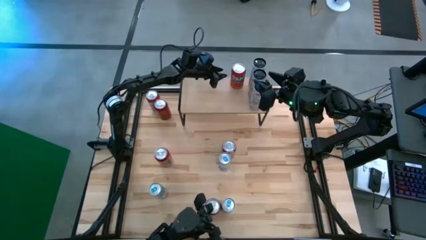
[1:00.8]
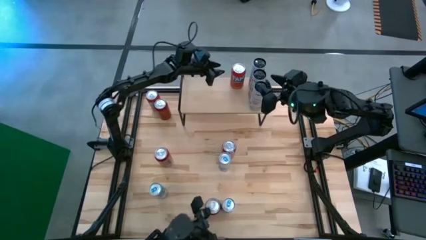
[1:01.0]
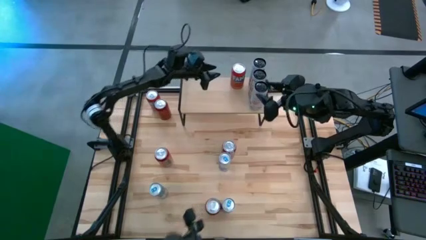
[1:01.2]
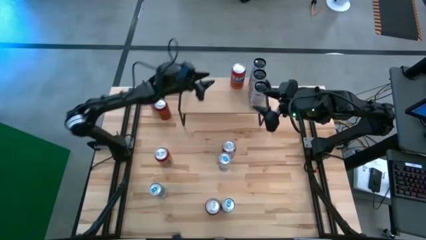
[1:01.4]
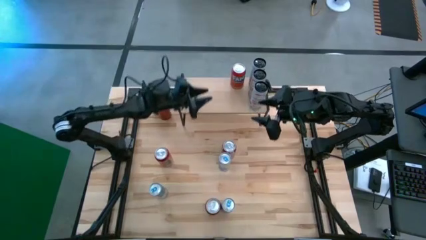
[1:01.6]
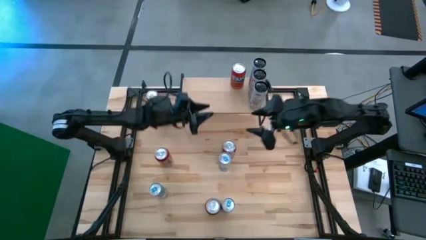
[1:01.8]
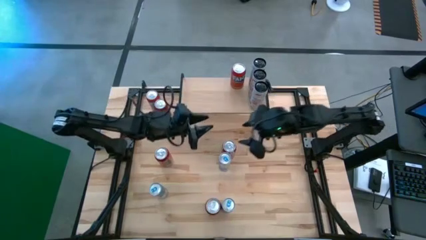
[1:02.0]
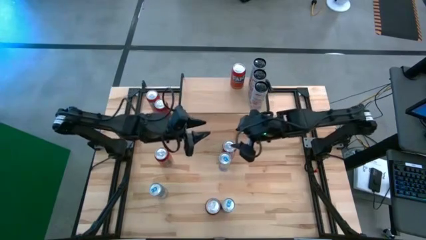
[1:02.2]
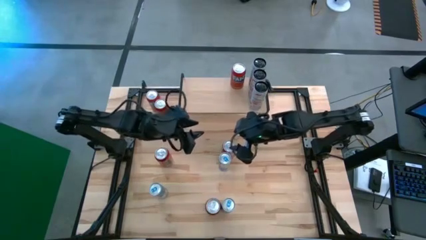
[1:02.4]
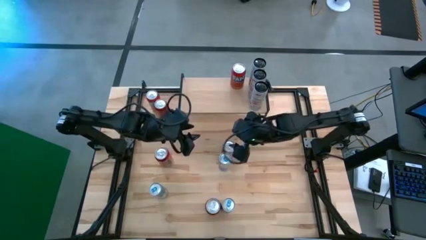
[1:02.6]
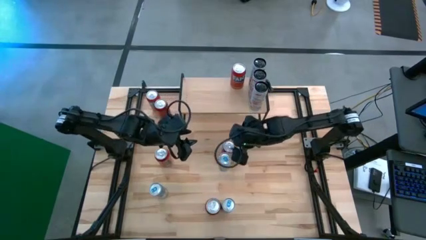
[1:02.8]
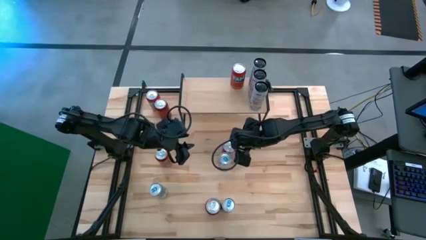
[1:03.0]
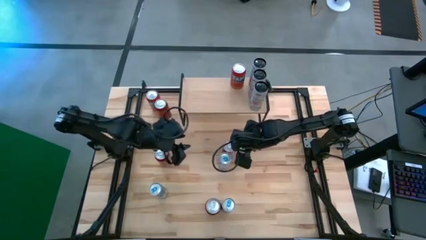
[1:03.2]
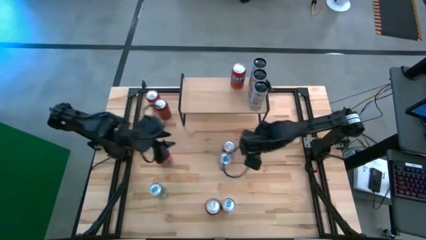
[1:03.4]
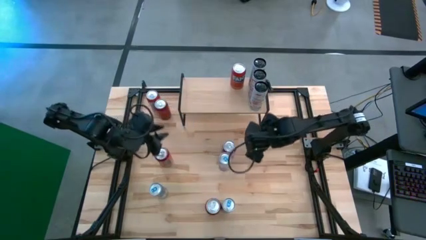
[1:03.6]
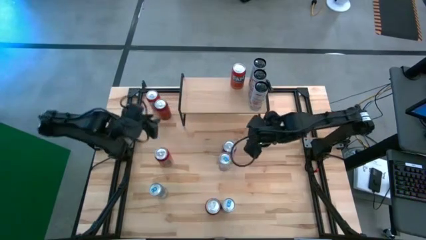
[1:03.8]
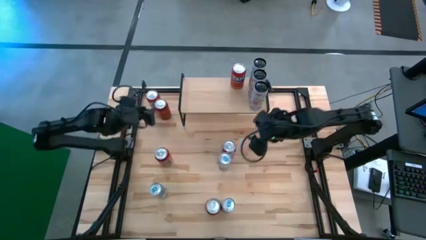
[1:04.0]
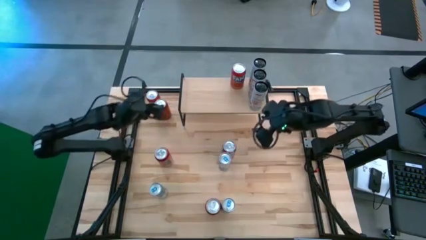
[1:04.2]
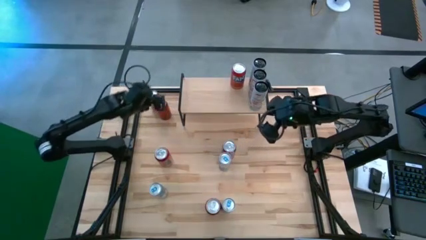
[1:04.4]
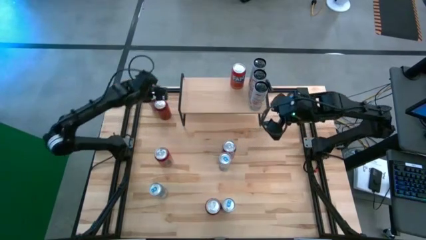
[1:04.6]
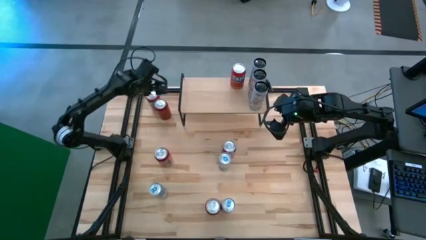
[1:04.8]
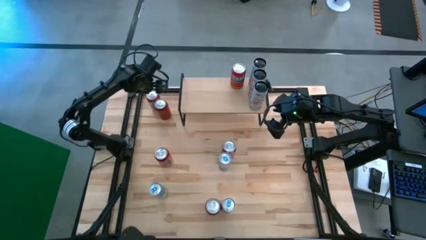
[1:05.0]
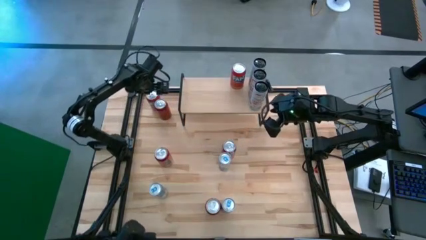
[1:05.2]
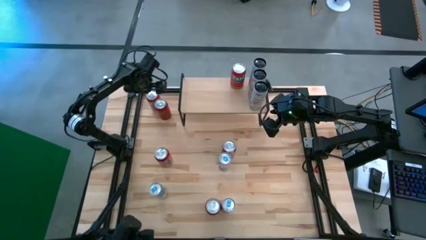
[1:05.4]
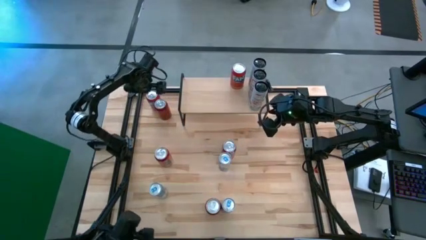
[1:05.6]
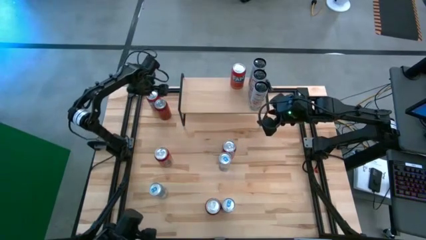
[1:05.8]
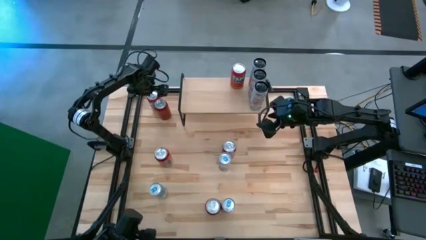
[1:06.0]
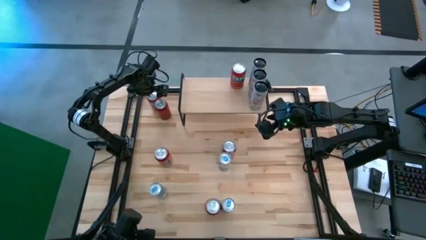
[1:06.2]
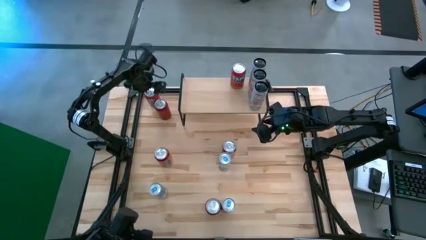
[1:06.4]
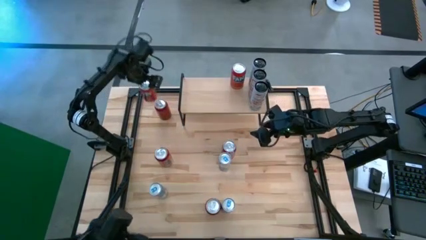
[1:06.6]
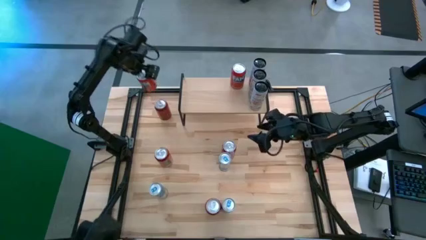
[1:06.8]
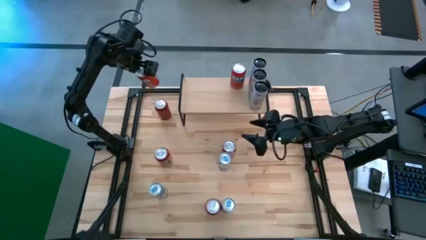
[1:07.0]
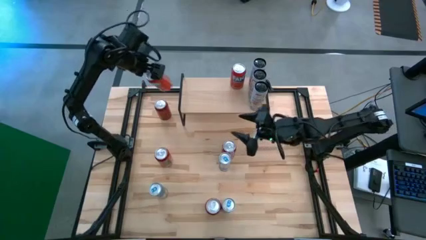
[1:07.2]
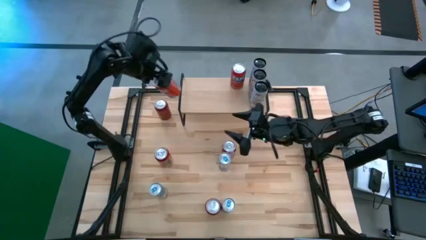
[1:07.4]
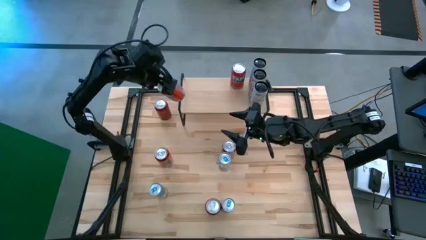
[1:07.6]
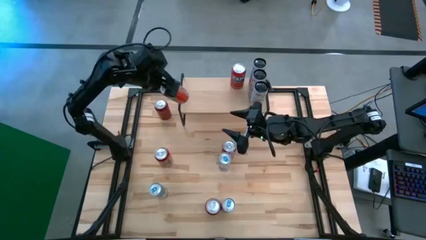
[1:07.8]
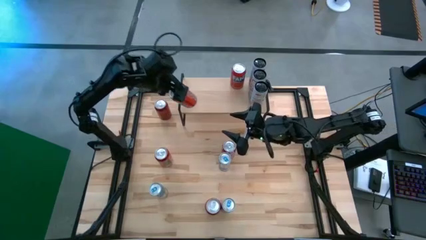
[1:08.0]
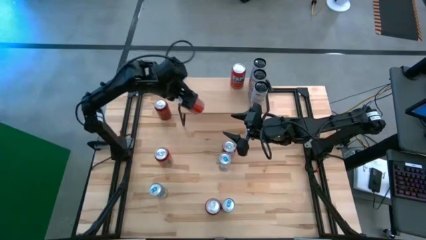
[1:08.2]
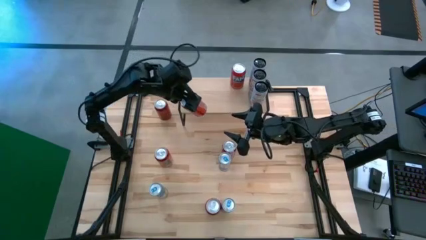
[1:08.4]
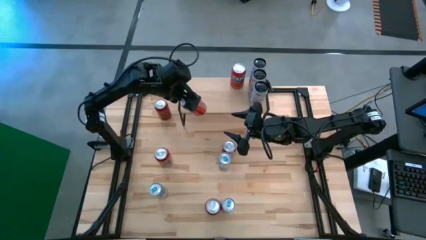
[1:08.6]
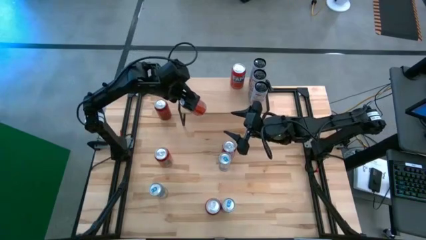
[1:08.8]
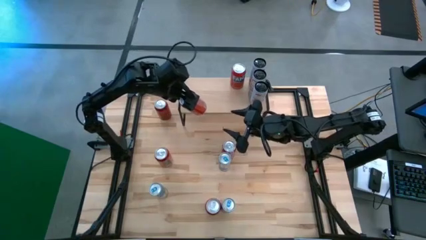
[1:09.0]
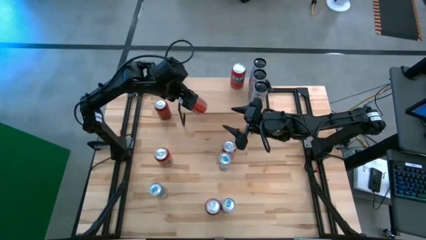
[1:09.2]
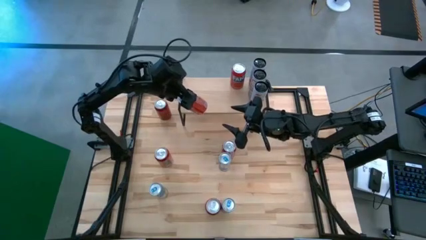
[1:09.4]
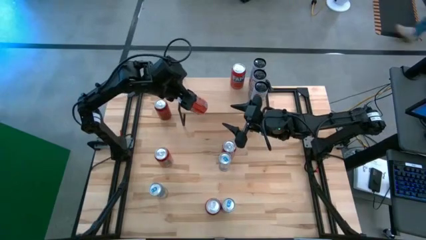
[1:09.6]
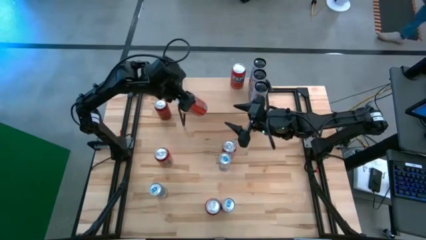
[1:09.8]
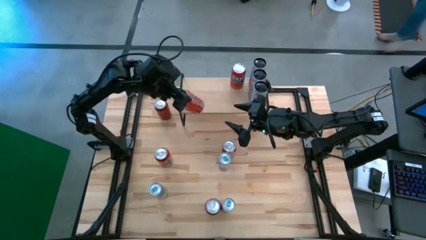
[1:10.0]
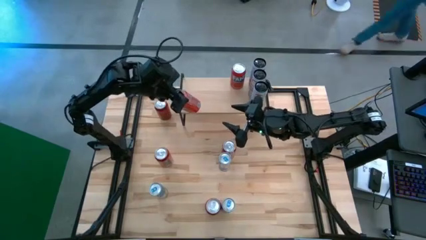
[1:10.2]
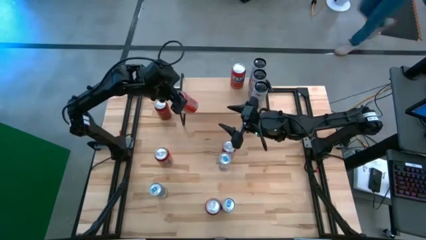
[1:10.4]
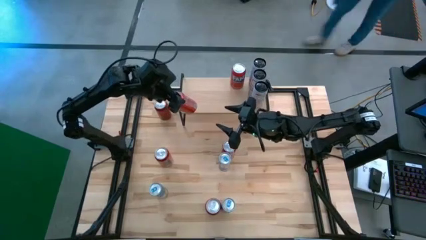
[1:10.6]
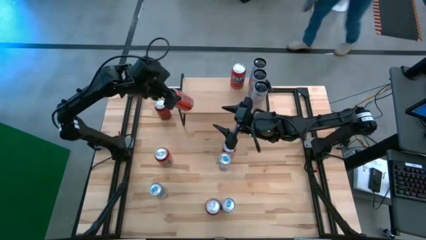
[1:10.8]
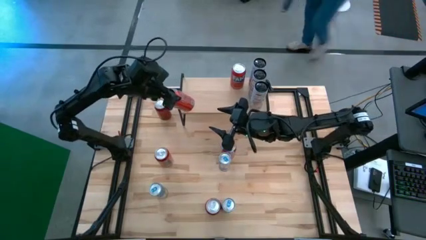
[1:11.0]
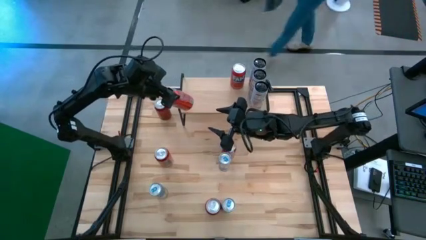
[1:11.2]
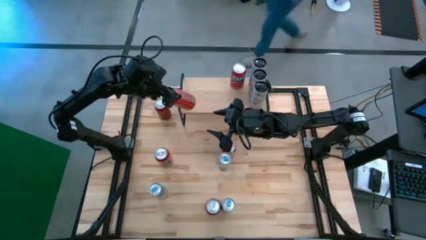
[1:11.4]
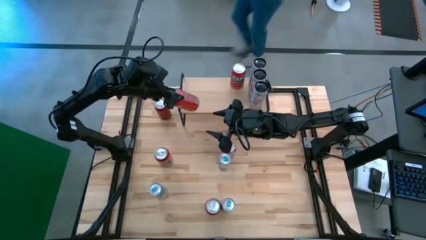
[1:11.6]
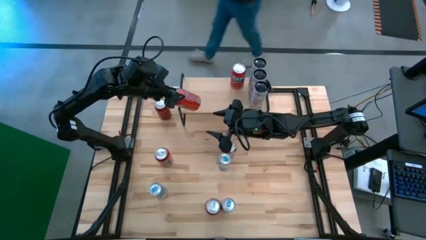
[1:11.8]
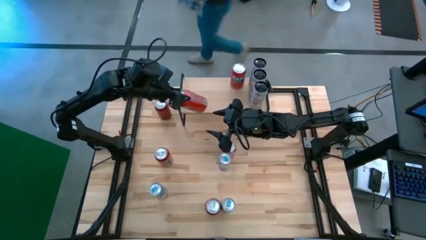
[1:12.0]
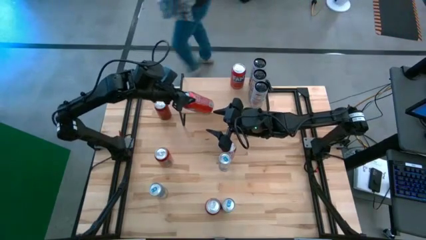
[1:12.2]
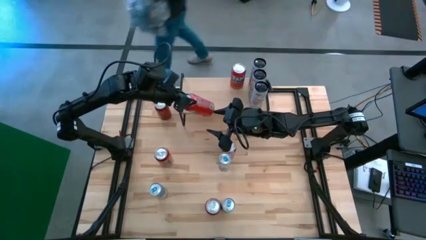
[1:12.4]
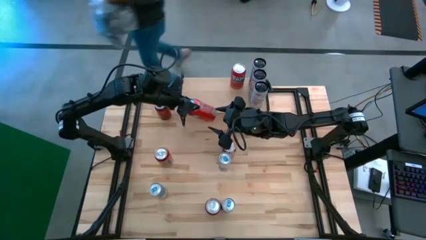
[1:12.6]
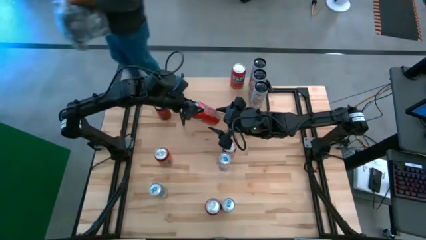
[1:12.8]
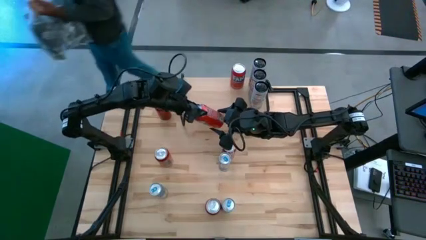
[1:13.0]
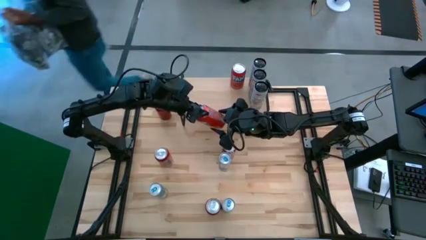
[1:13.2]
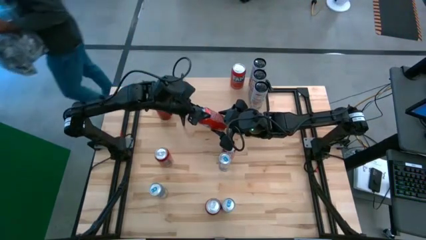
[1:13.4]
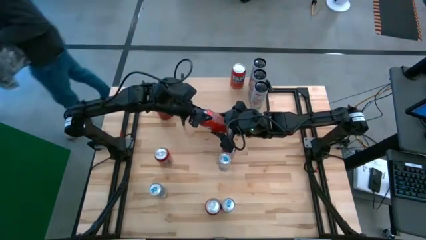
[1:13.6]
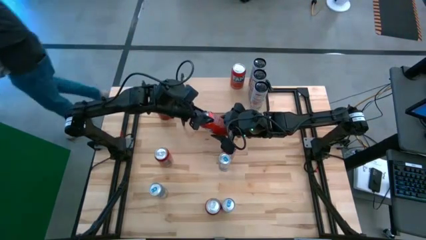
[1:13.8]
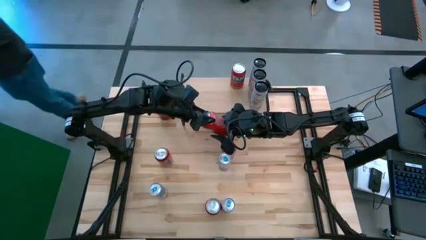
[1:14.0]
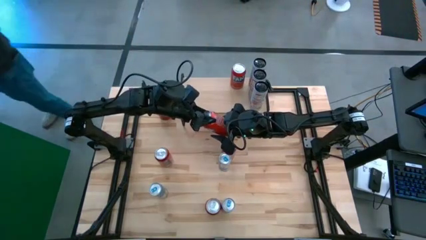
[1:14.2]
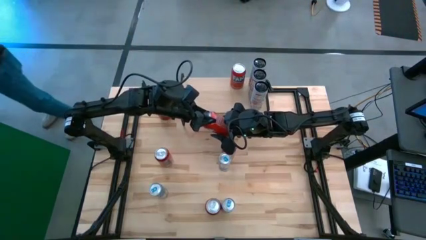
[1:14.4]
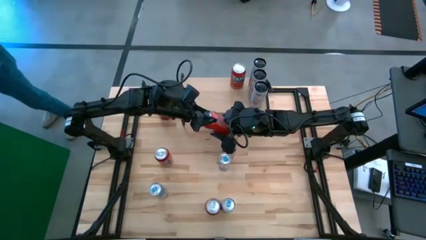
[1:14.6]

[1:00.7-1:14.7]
Task: Place canned beverage on shelf
Put the top red soda can aligned with the other red soda can on the shelf
